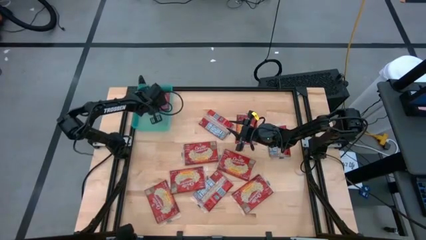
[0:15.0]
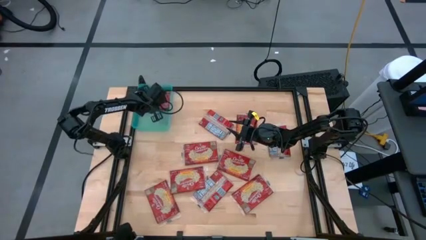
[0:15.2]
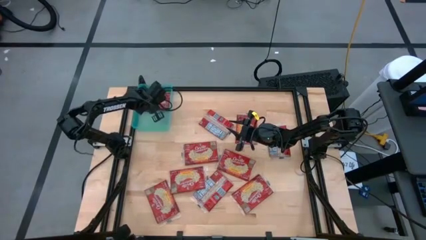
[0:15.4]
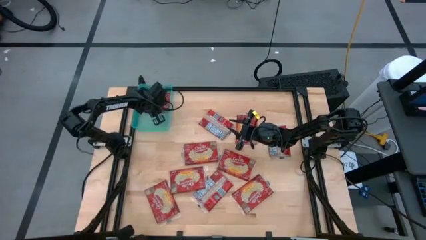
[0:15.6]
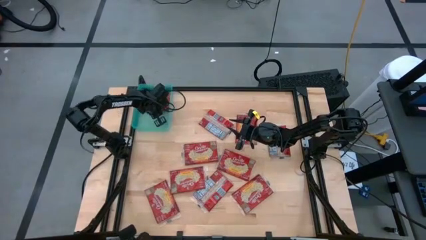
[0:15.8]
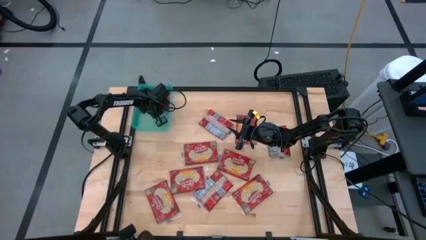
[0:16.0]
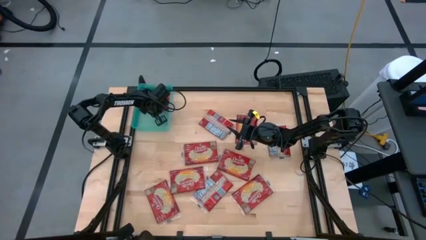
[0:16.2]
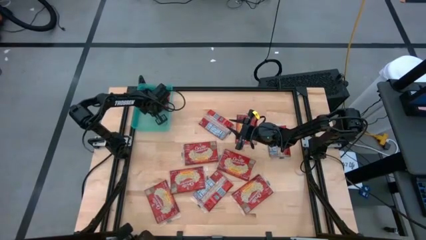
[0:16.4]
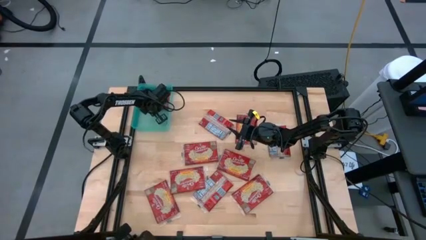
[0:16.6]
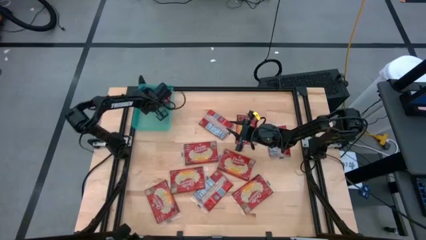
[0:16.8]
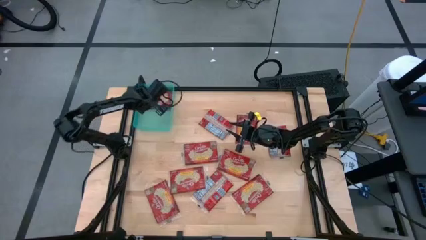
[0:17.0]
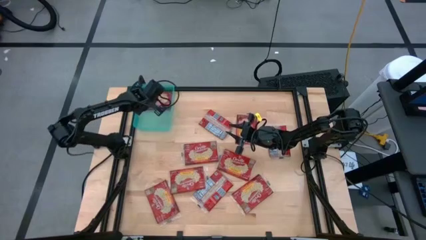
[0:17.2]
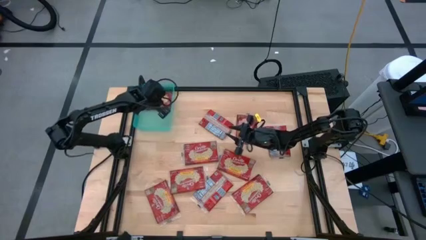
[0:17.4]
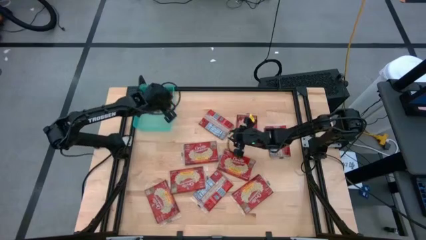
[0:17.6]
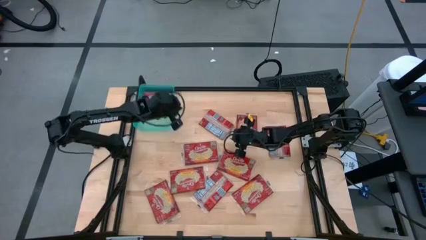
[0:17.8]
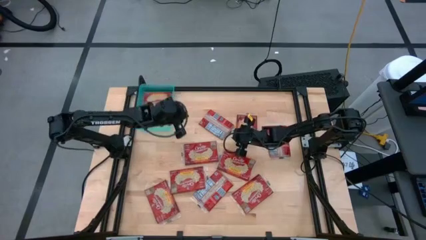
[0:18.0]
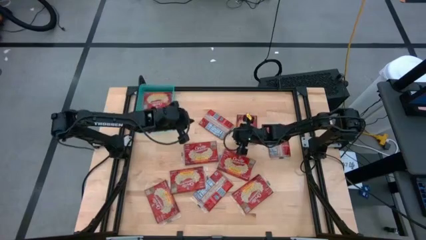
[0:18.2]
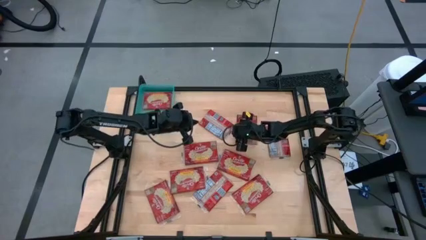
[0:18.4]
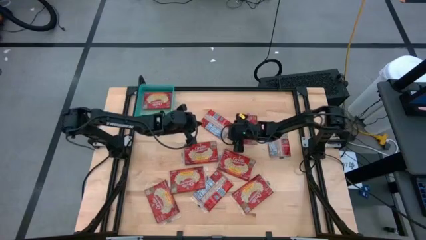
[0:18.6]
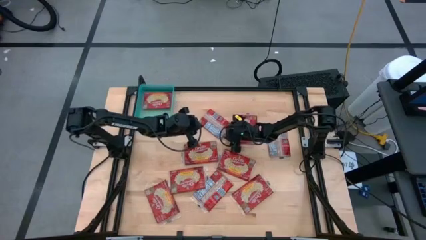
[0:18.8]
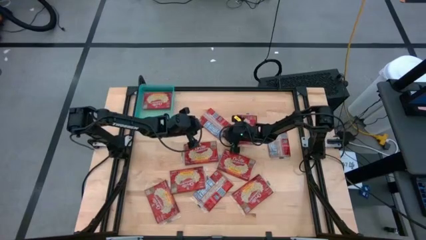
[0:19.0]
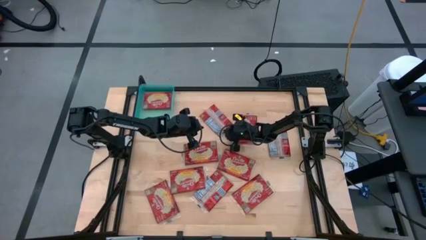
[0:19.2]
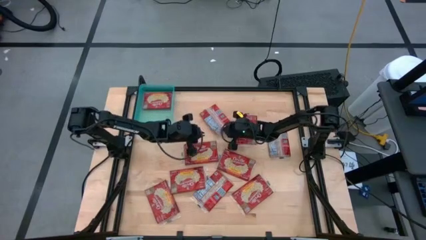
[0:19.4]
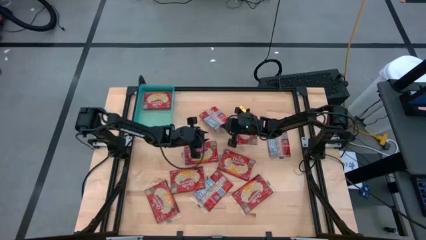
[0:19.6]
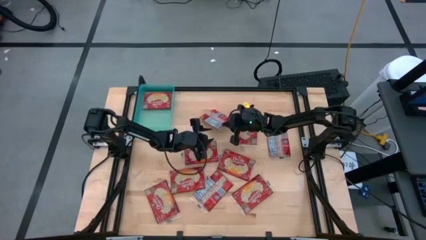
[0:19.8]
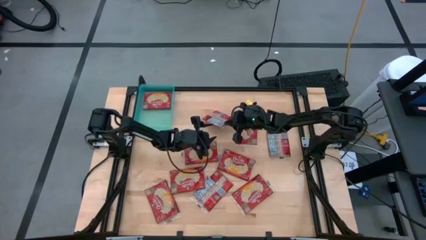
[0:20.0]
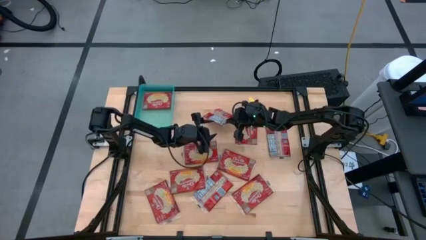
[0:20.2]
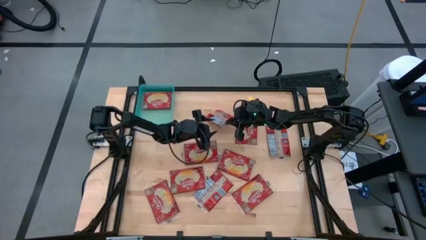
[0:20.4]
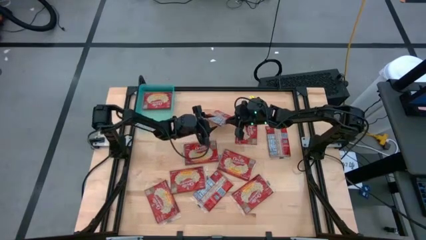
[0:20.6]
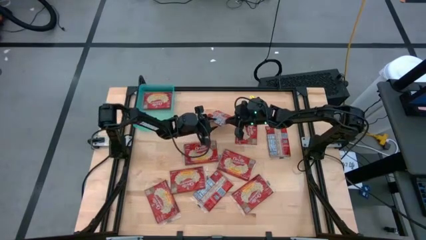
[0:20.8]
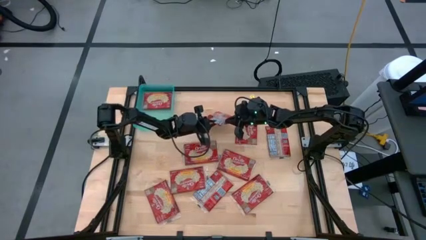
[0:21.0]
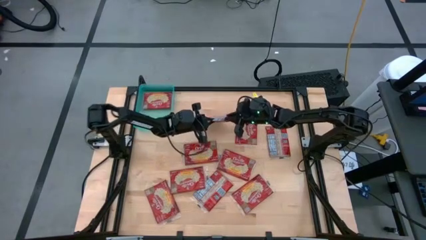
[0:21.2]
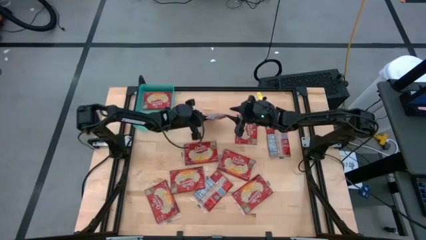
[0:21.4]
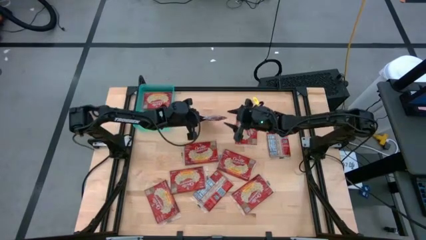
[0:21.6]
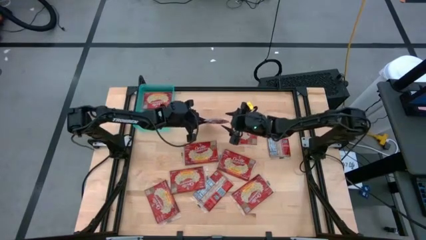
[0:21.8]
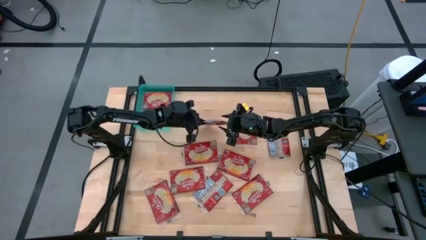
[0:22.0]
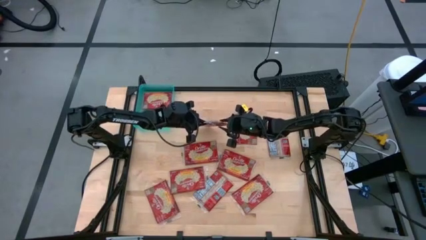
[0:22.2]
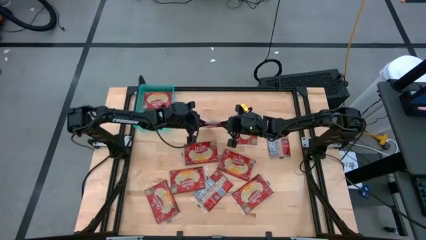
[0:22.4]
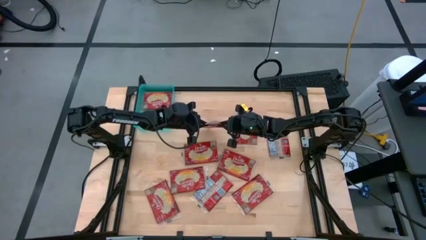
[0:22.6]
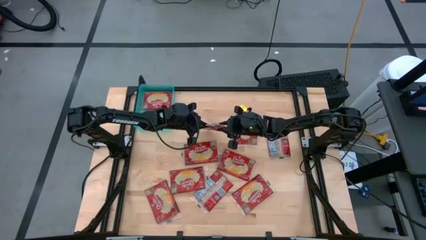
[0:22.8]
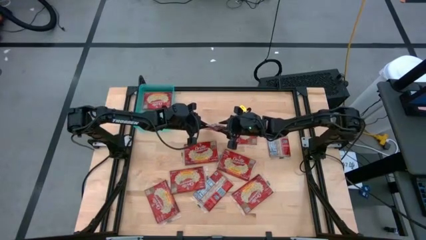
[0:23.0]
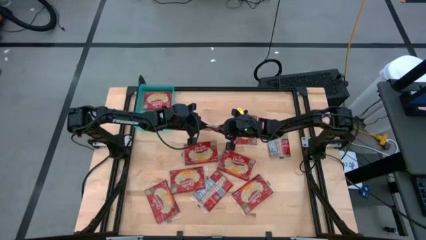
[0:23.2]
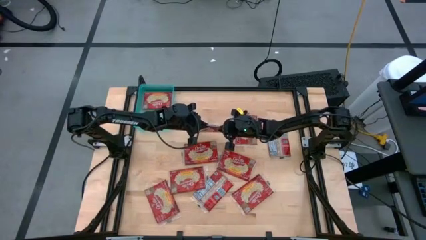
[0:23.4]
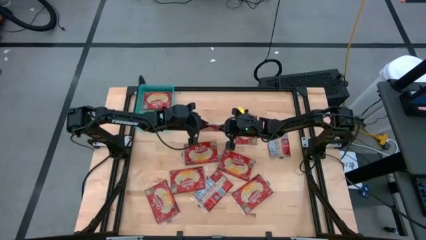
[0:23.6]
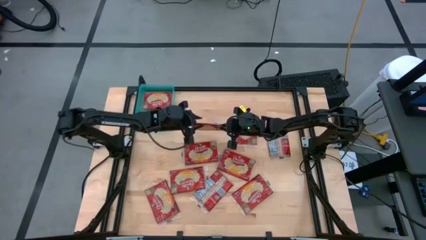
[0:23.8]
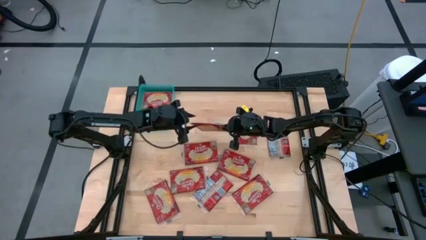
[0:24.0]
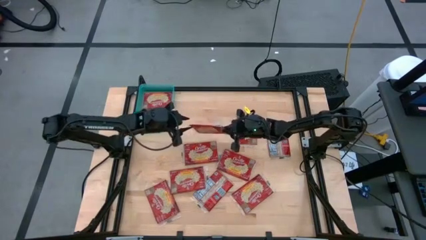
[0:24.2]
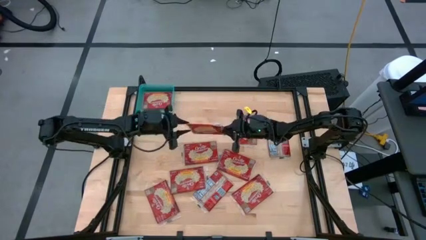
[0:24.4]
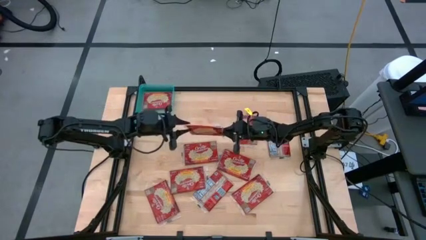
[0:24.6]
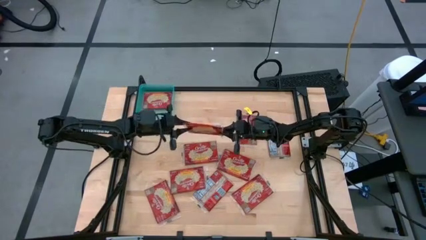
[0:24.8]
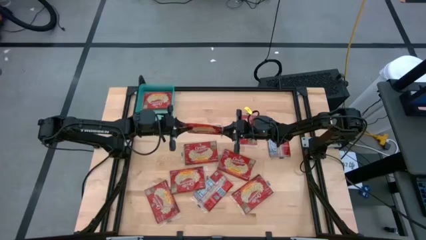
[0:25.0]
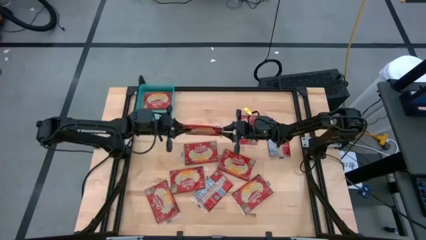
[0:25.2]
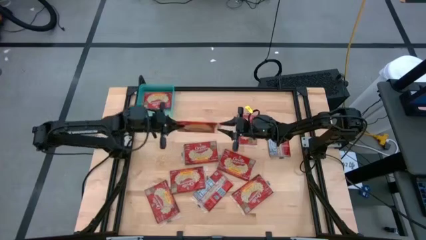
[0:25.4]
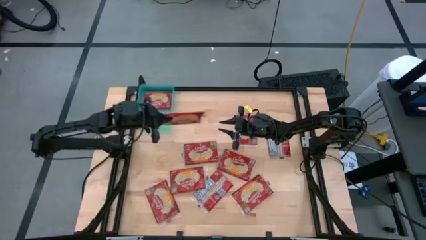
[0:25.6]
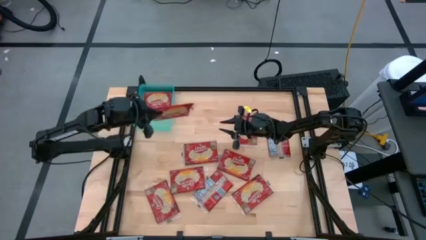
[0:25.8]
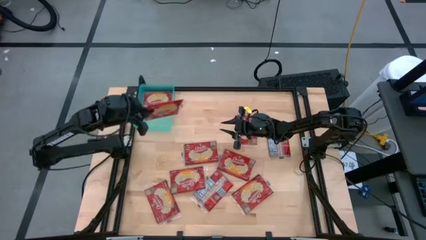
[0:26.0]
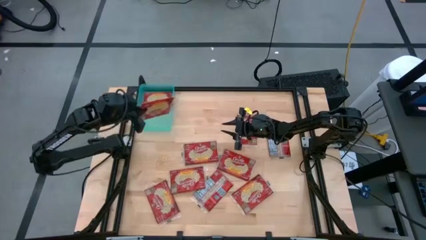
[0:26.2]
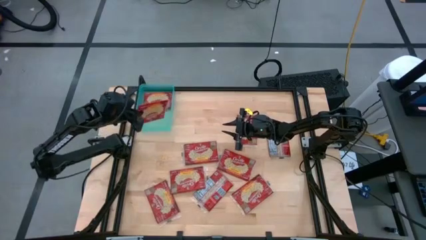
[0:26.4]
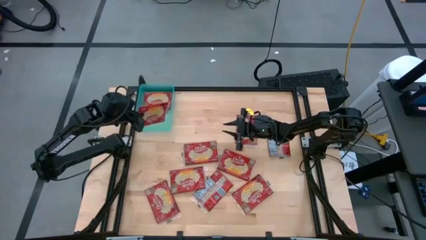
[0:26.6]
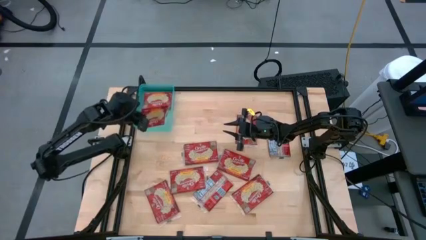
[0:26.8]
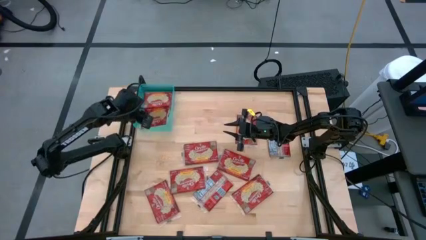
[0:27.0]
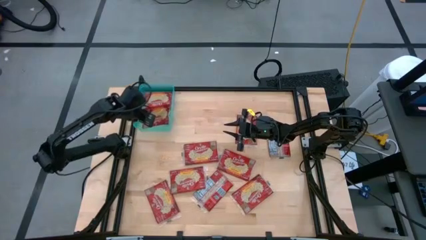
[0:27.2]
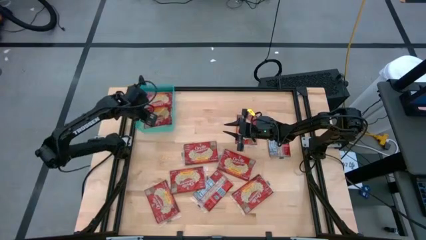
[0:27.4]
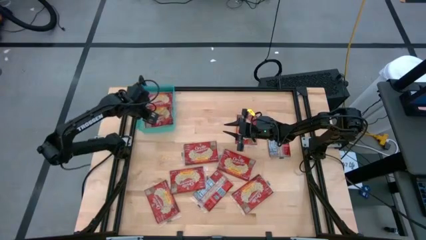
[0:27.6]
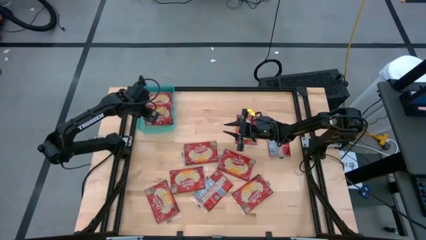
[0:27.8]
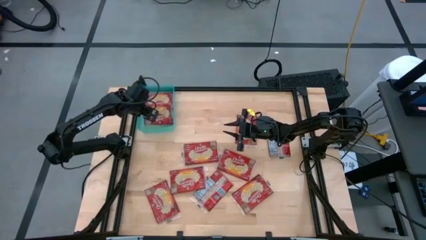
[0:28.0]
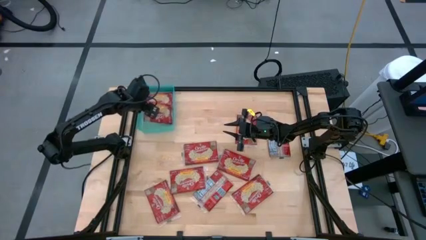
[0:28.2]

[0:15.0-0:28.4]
Task: Sort popcorn bags into baskets
Put the popcorn bag into the blue bin
